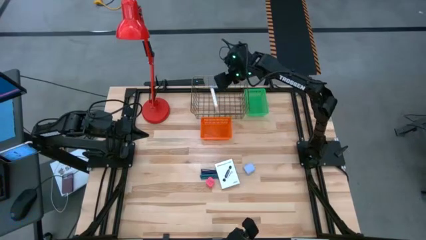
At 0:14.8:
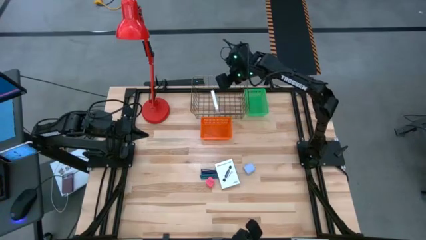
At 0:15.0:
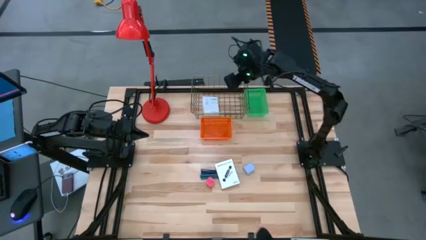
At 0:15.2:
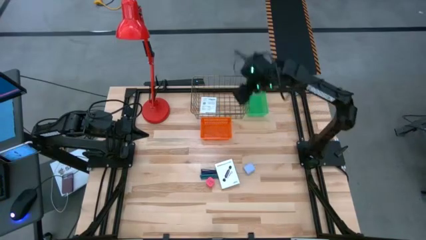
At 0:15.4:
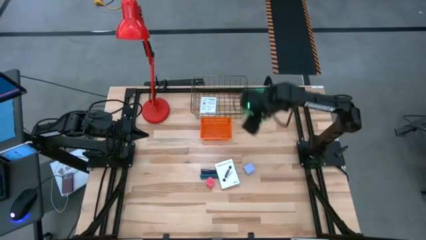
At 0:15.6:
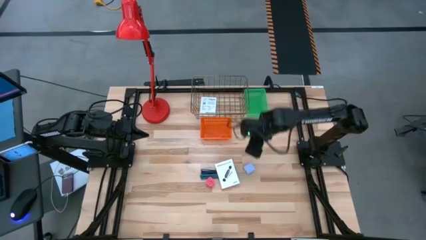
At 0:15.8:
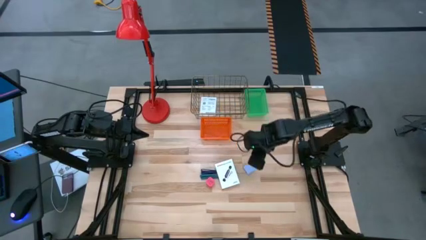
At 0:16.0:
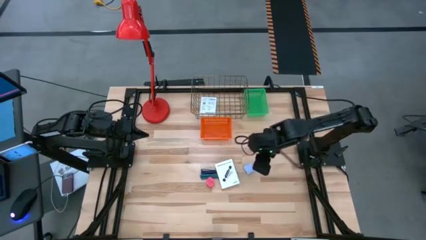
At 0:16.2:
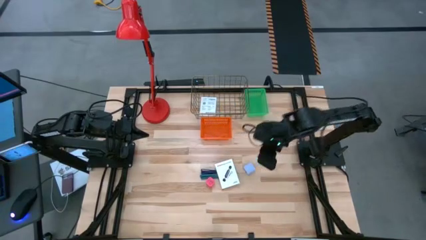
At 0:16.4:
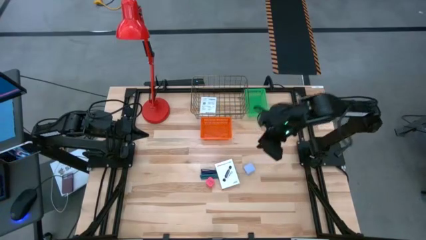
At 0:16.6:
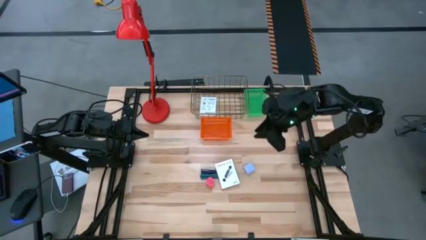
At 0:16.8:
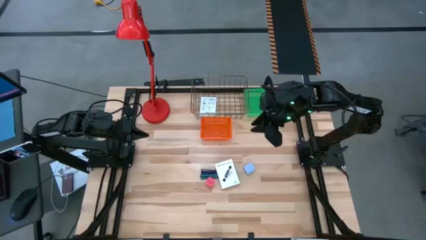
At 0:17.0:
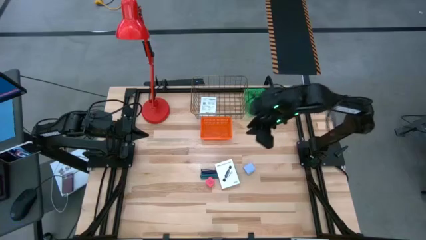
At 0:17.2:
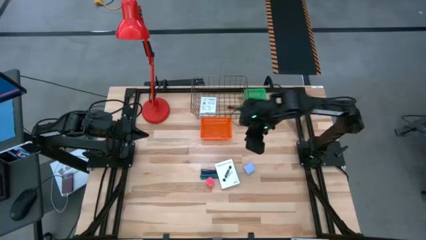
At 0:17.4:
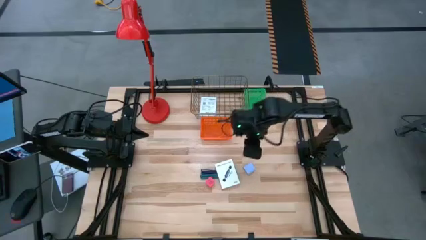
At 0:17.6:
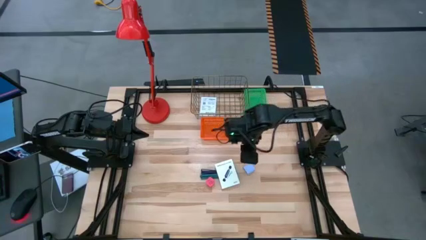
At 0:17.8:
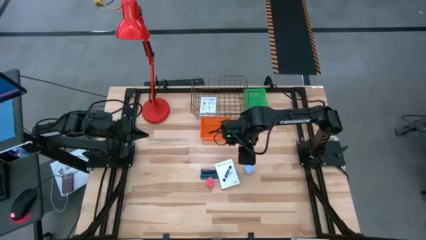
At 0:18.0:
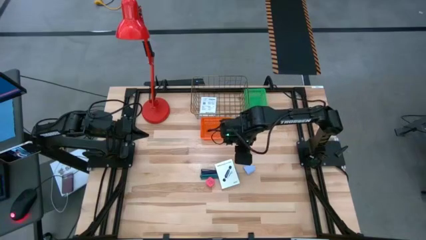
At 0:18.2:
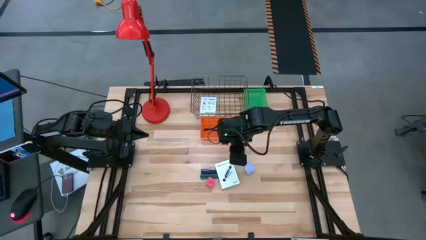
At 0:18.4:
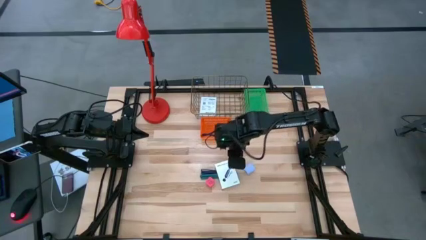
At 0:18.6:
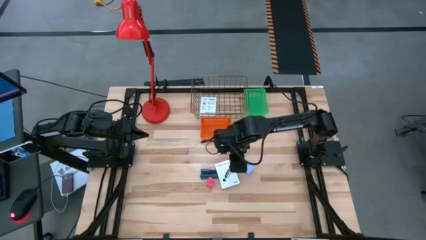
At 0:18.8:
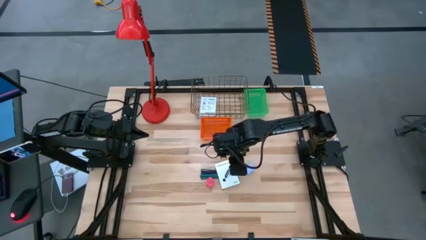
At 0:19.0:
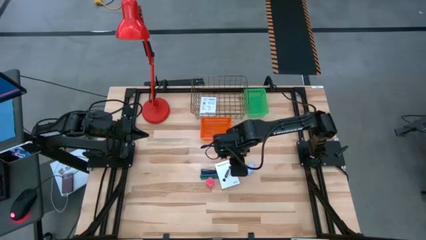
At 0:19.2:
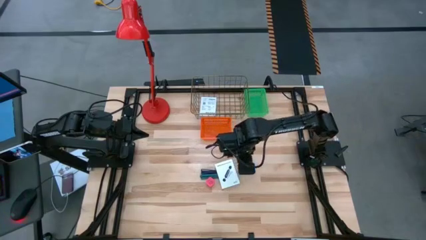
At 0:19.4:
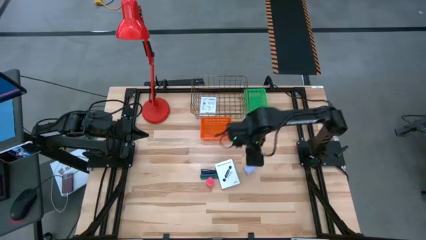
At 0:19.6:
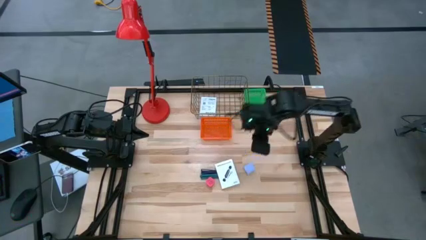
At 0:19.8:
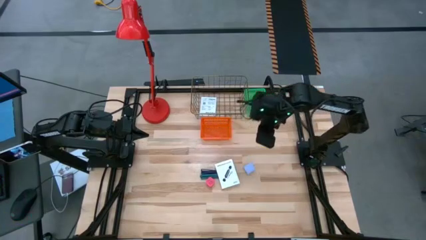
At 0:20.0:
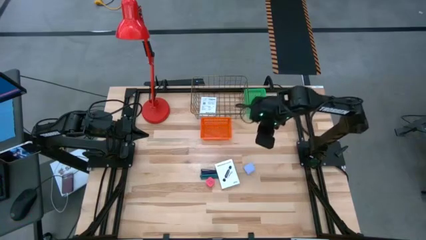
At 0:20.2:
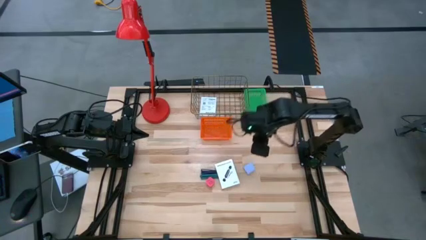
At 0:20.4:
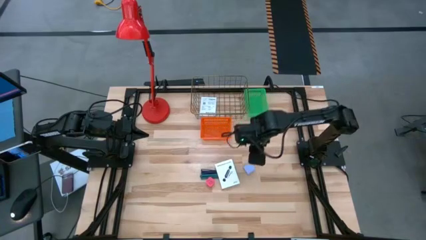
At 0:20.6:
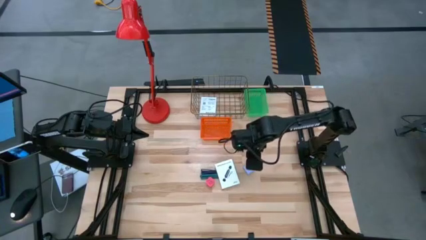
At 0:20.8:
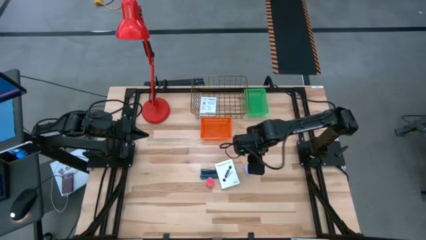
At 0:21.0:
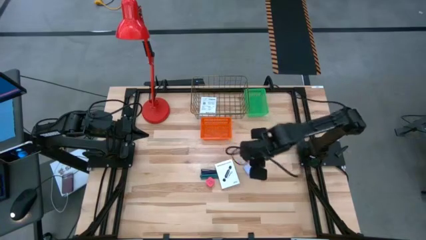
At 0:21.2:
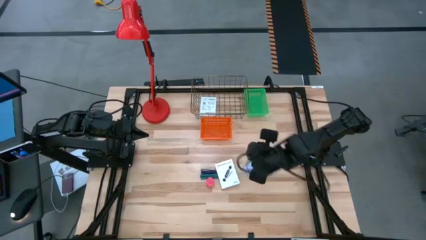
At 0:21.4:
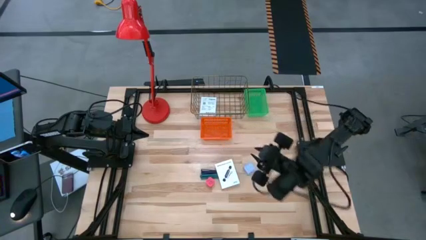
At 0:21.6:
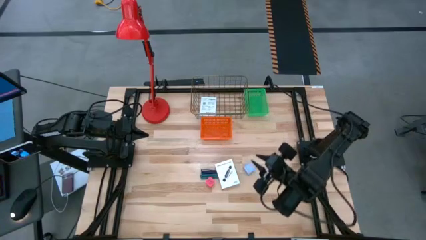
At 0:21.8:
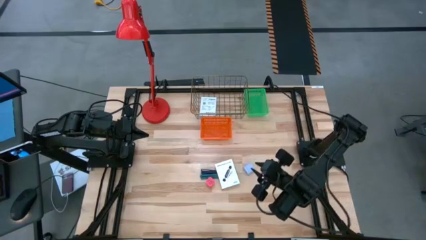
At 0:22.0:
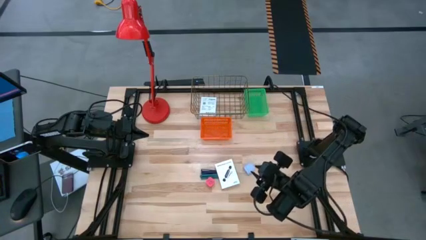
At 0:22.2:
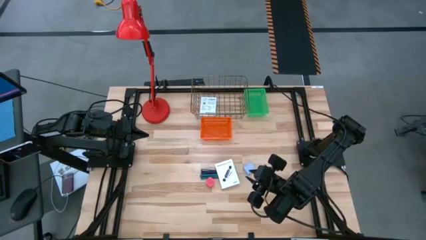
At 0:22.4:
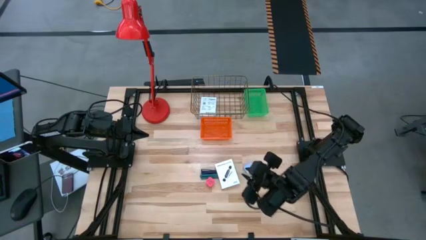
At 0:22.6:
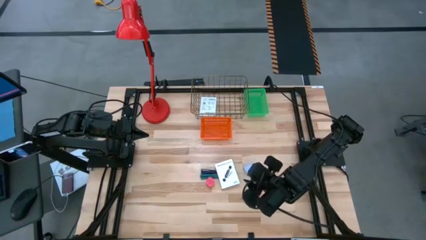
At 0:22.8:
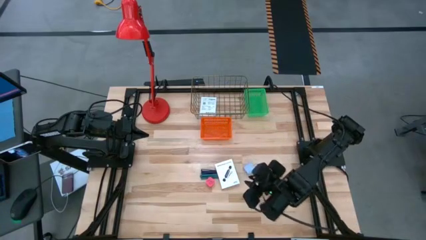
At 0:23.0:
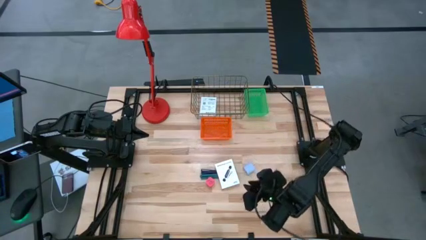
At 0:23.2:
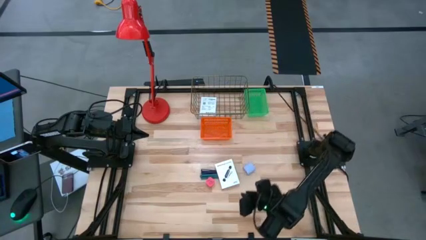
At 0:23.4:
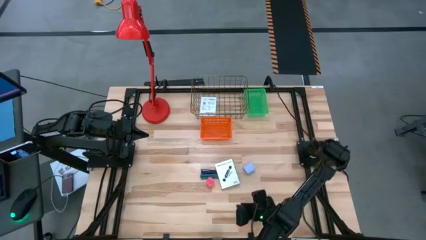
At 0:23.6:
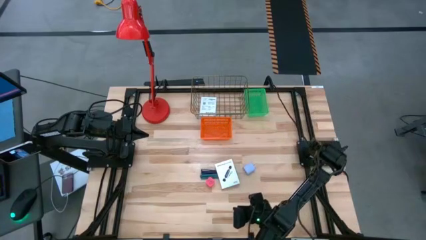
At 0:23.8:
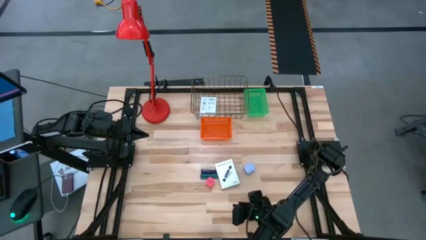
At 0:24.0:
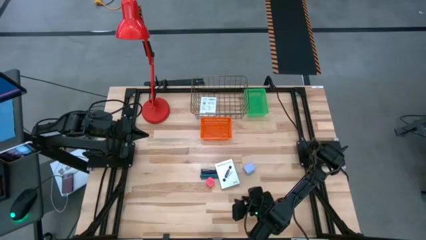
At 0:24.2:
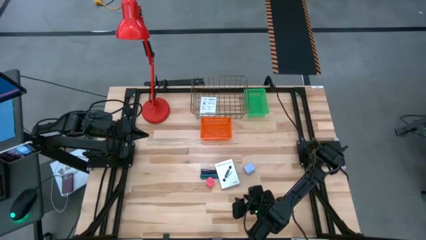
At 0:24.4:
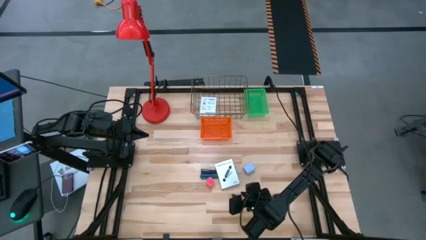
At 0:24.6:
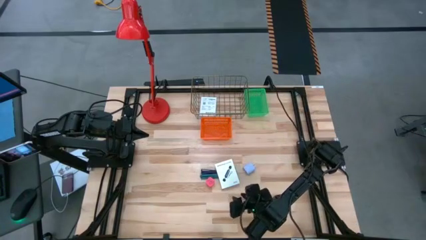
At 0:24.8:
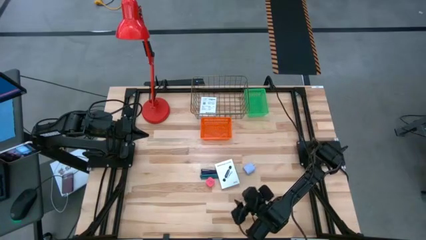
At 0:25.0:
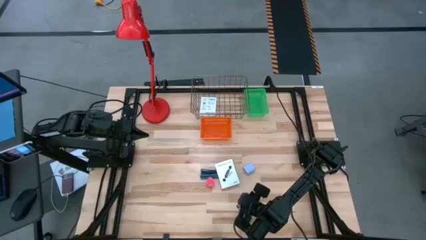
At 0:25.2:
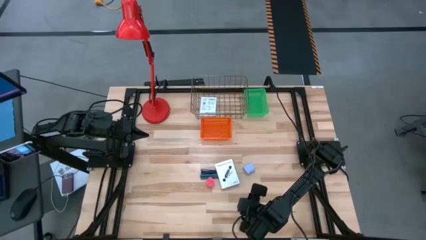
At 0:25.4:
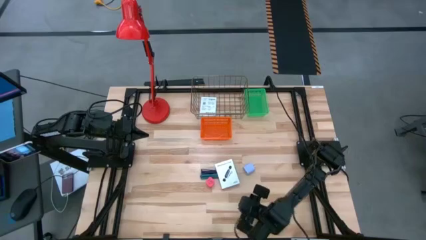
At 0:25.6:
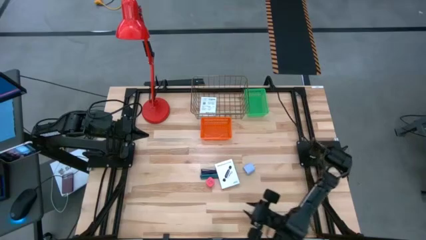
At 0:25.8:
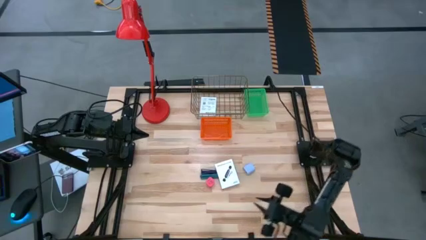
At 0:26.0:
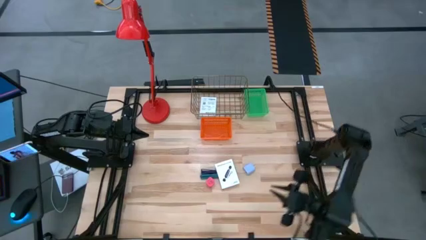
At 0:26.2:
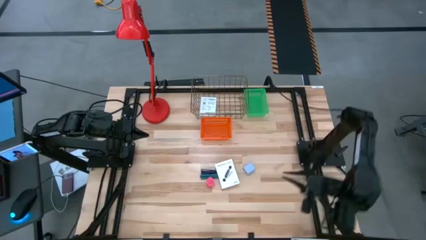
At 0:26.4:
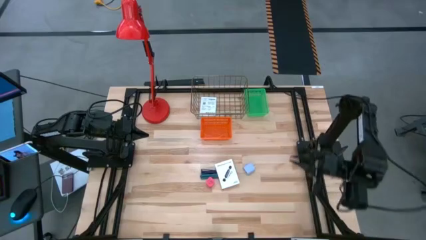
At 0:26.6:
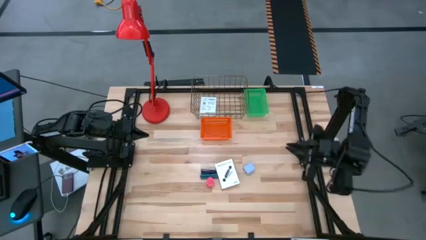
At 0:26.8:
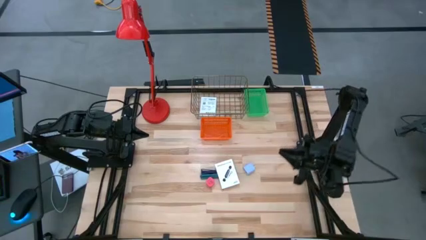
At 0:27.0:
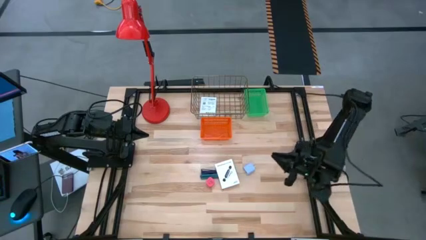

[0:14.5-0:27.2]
Task: Pick and place items into bin
Put the card reader box into the gold wire basket
